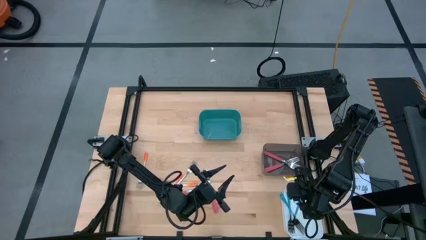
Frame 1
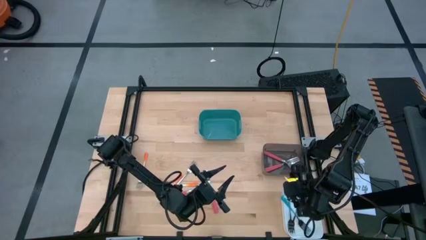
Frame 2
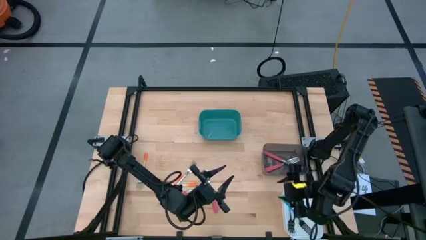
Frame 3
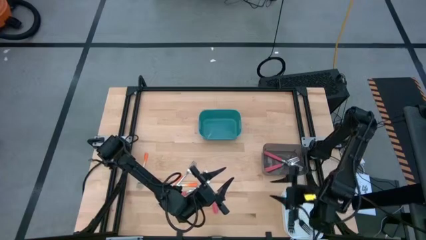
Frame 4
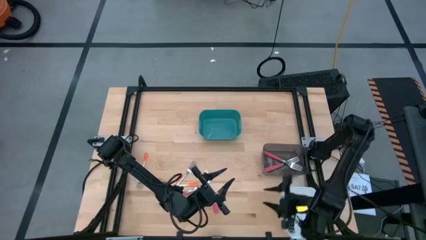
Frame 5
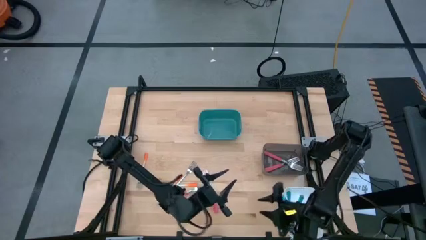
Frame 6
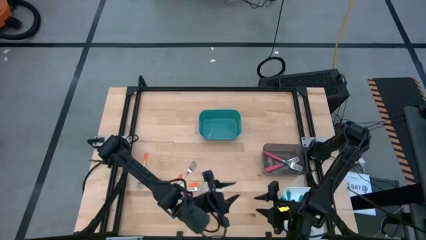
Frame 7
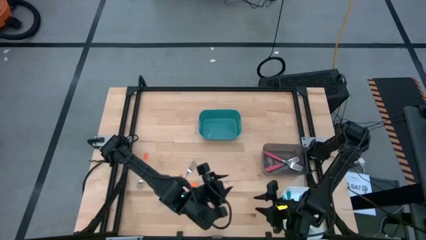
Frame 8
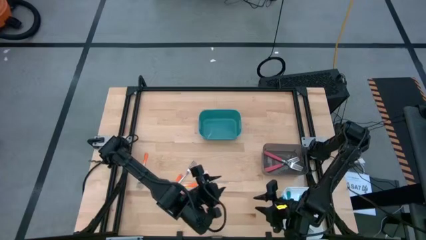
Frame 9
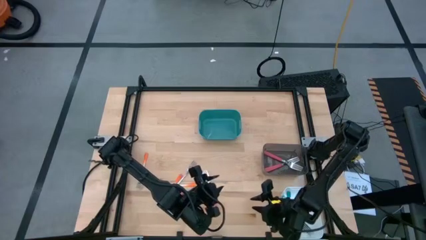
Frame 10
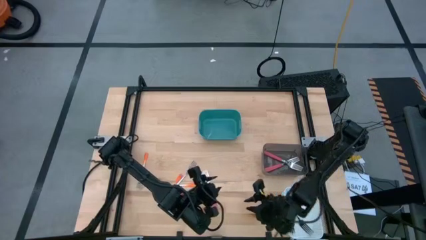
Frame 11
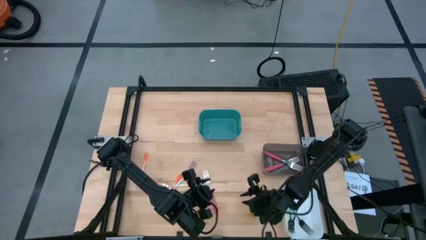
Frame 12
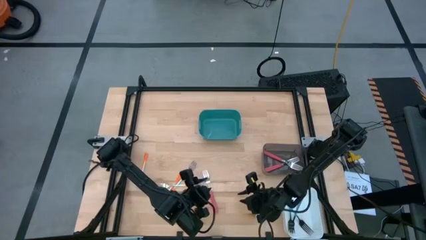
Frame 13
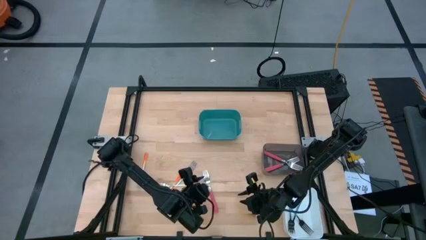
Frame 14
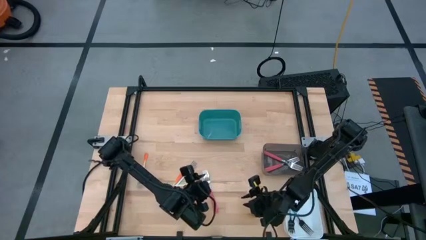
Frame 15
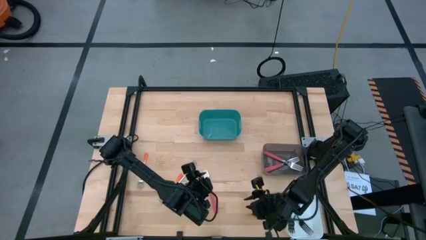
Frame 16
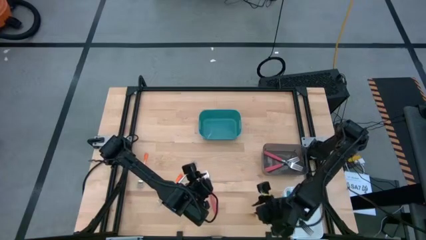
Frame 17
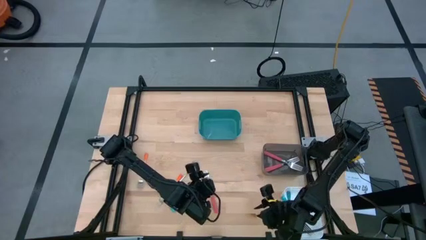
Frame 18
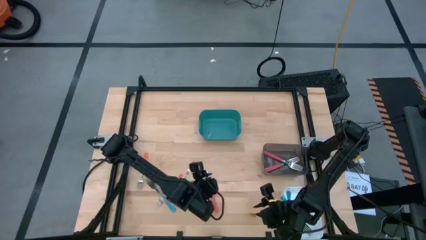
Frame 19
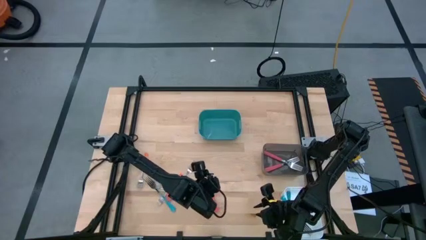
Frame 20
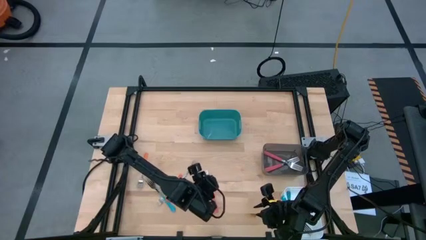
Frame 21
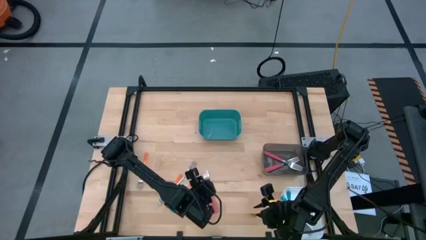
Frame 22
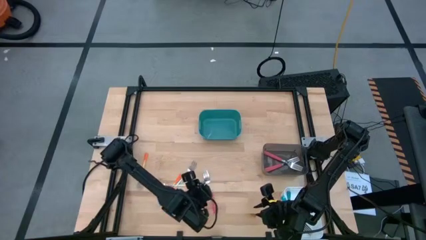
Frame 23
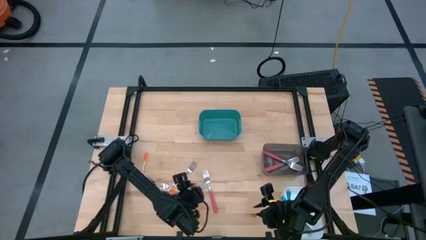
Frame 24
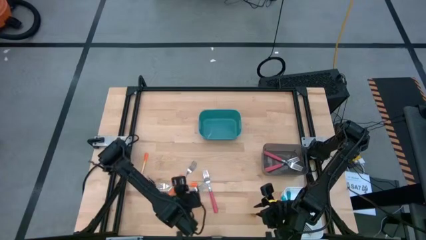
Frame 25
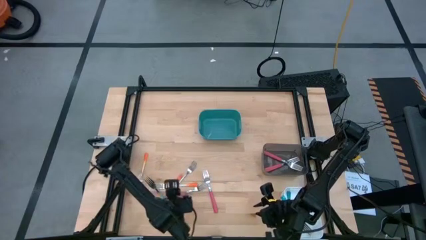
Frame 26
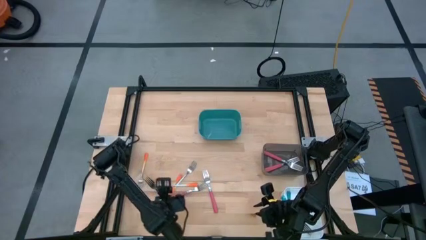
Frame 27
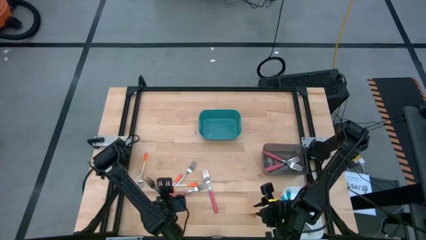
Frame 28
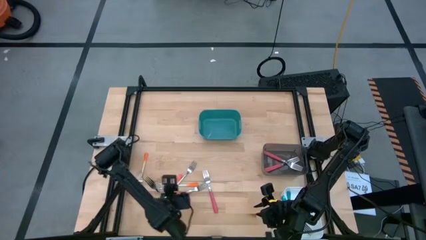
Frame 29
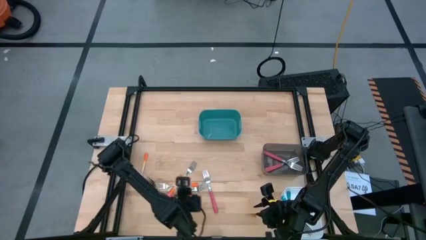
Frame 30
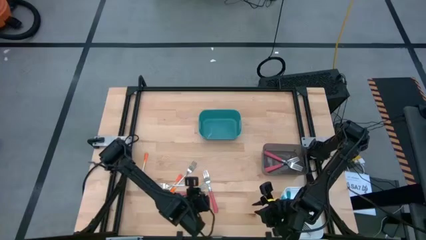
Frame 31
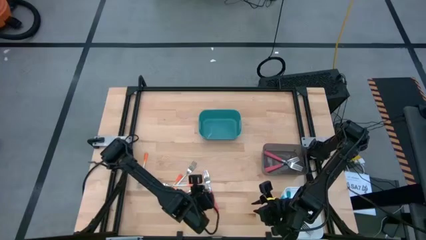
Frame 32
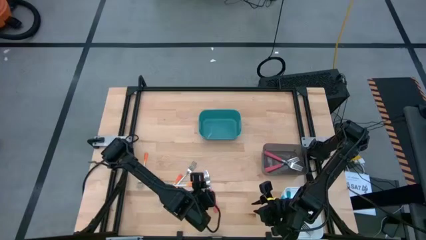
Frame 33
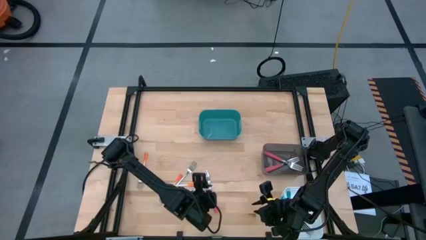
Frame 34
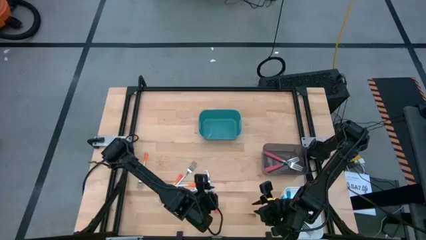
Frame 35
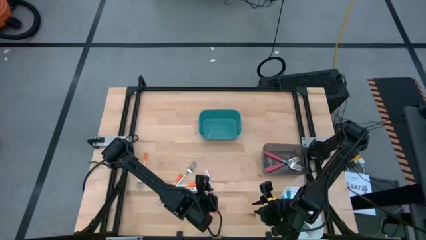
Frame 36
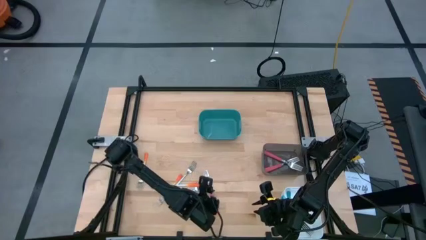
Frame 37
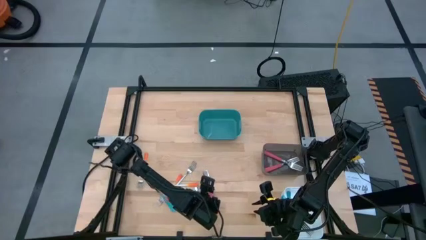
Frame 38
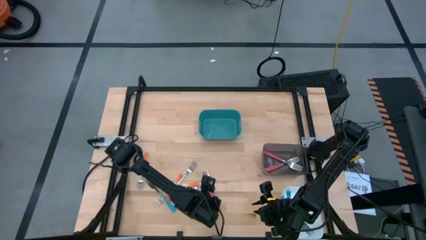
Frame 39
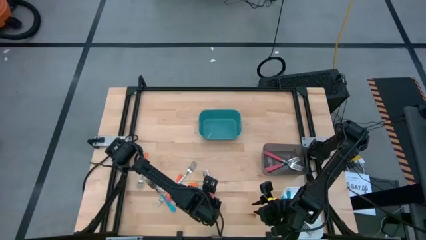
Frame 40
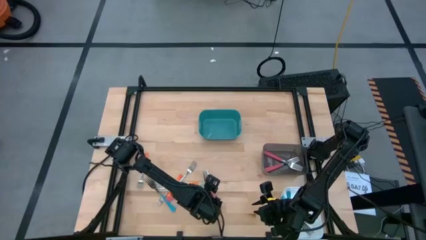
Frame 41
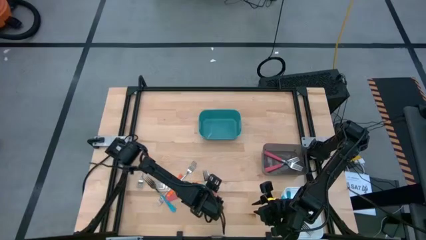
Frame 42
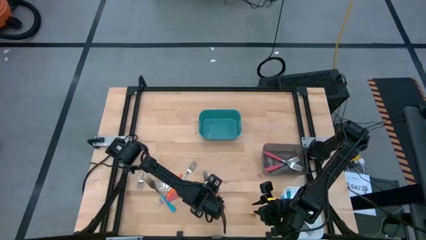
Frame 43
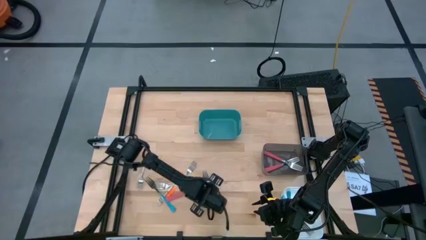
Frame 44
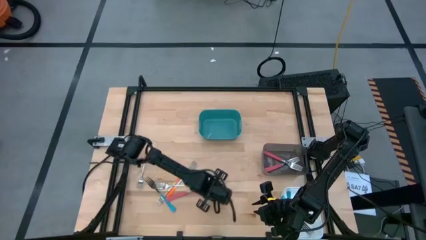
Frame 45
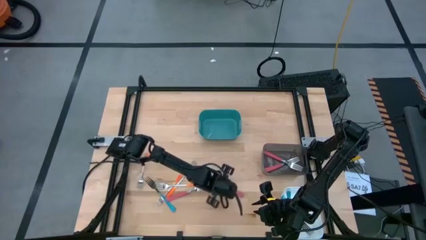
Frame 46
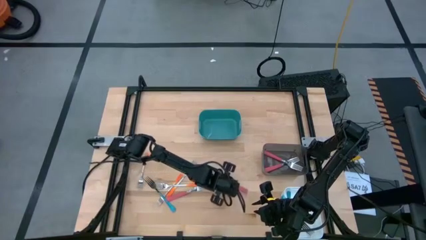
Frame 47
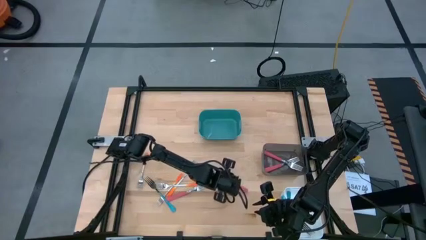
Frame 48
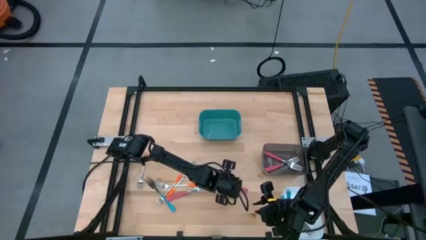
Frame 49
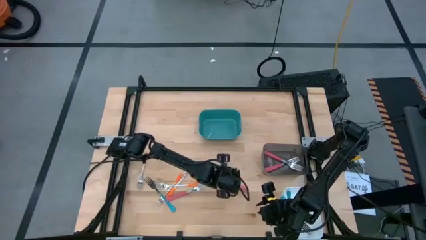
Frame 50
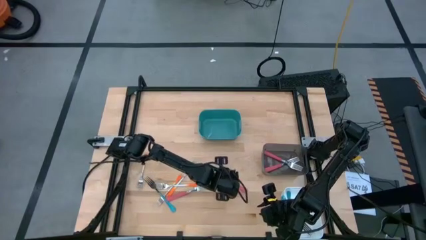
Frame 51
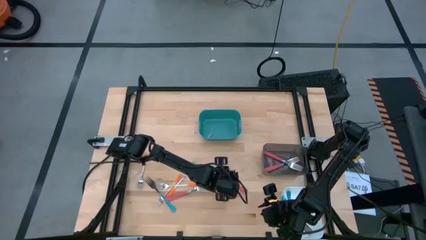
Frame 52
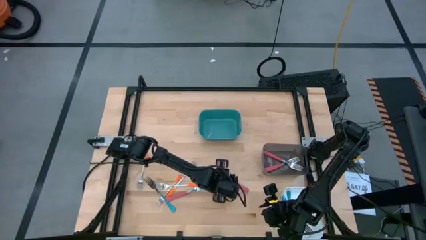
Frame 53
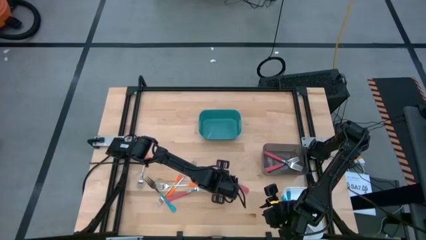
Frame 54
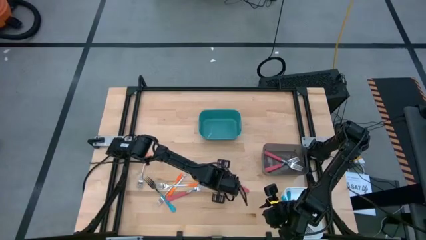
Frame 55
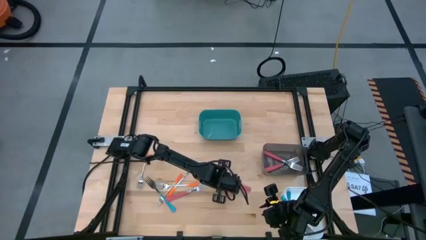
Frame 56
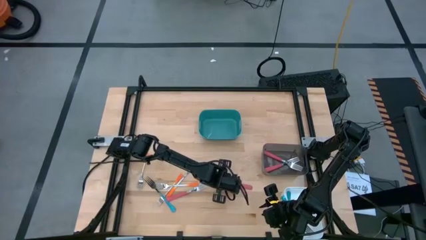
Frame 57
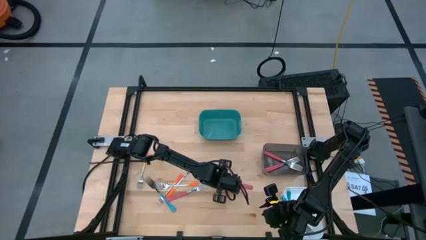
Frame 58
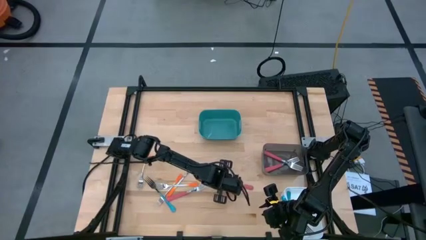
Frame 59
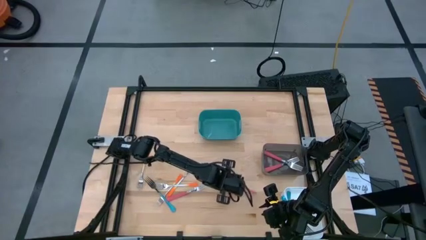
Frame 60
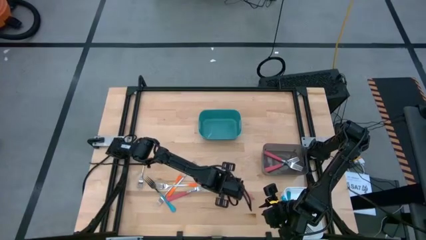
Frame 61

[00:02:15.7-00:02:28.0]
Task: Sort silverware by color (type)
Put the pink fork into the black bin

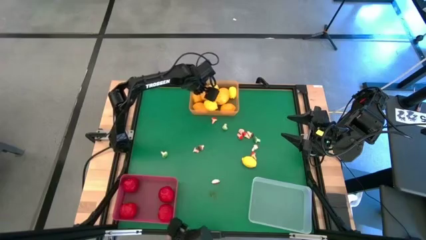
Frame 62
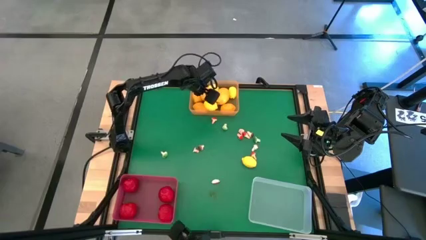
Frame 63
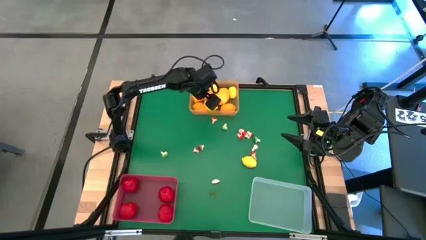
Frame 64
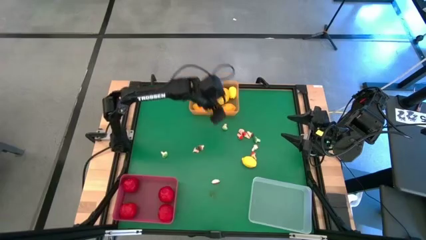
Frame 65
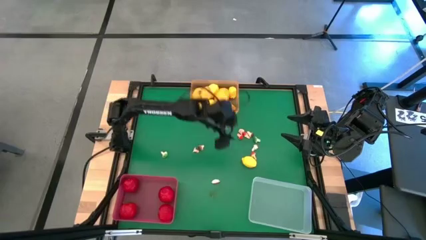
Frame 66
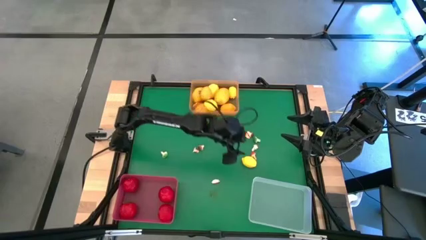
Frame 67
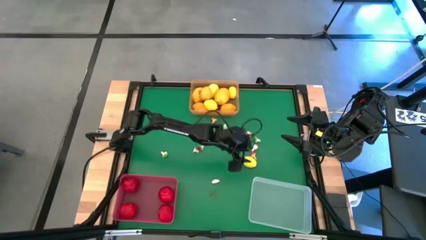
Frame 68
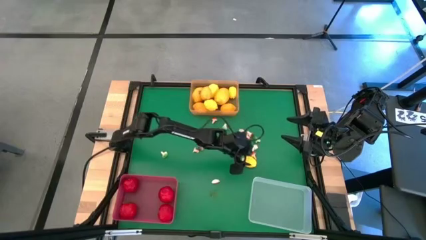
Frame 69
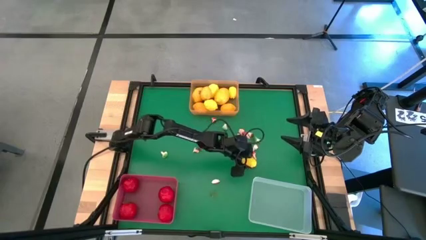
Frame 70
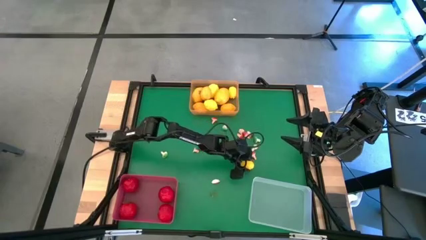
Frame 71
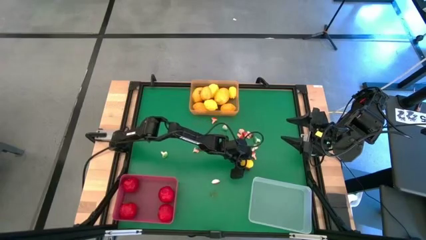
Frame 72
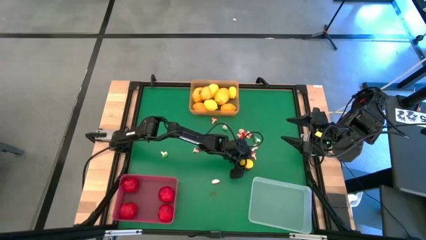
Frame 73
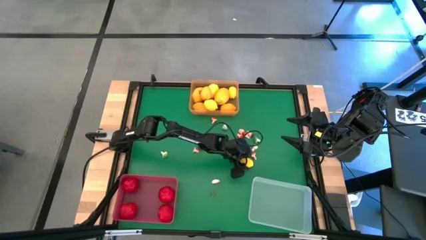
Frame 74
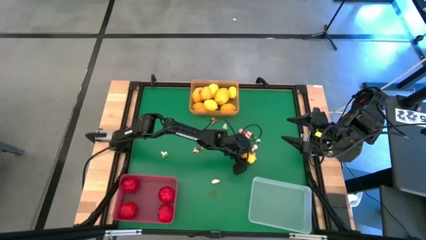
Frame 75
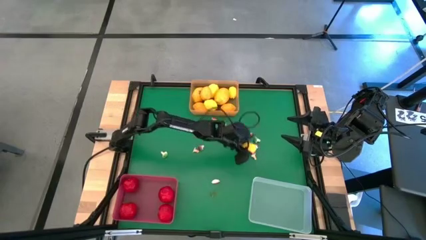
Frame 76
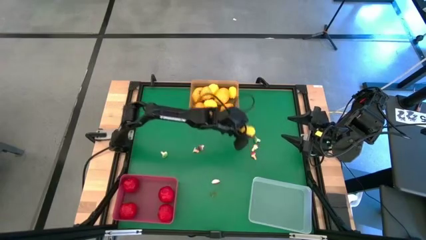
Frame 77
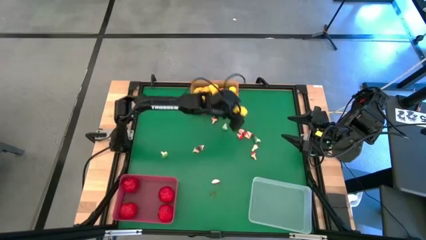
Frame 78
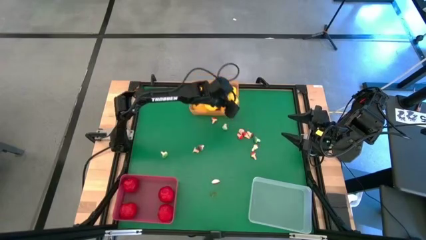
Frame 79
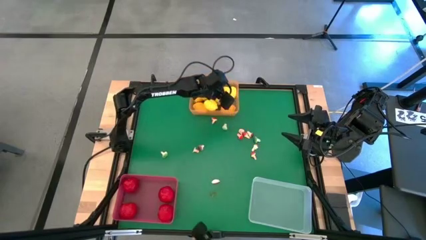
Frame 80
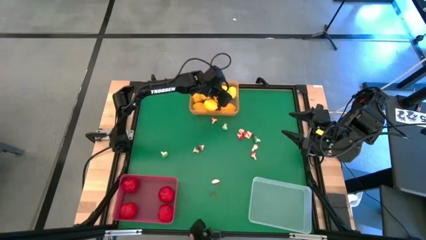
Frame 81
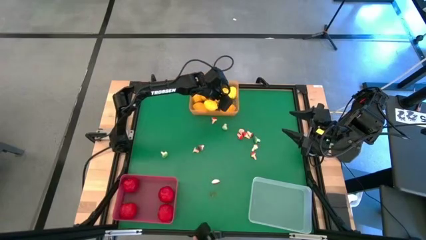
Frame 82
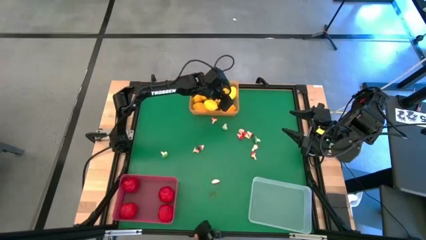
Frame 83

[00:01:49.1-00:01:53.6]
Task: Sort produce into baskets
Put the yellow lemon into the orange bin
